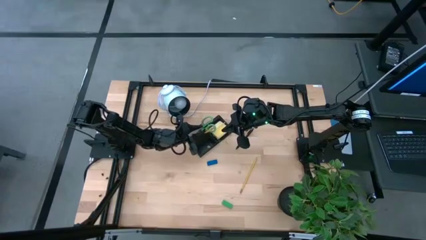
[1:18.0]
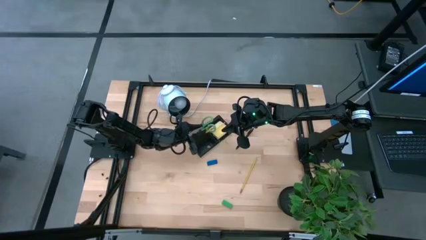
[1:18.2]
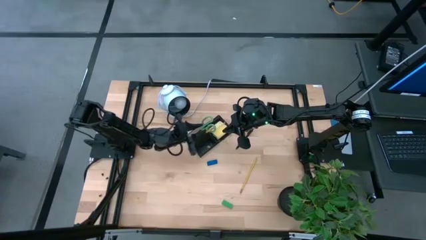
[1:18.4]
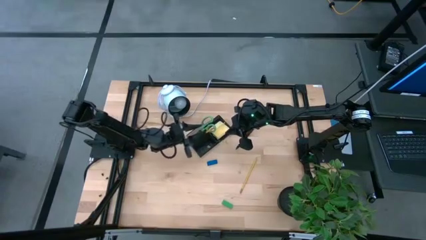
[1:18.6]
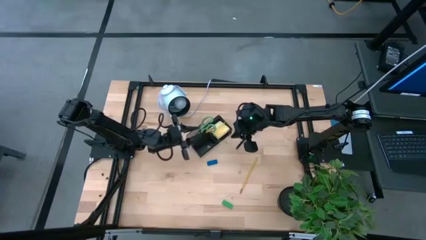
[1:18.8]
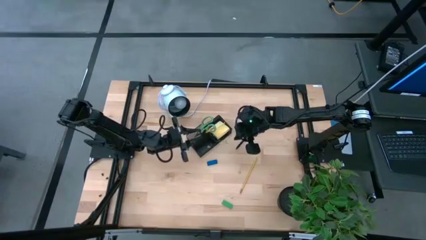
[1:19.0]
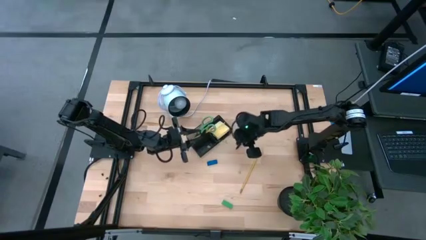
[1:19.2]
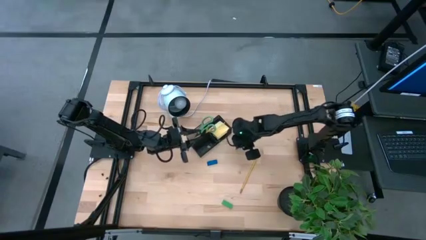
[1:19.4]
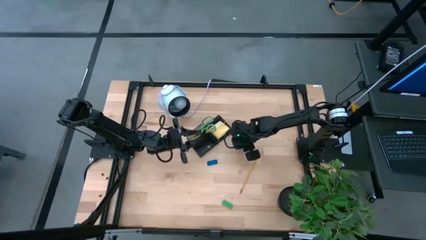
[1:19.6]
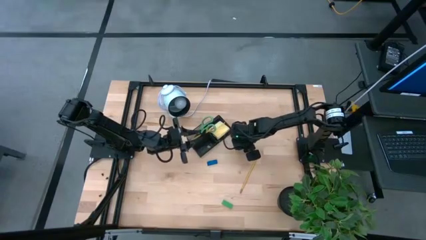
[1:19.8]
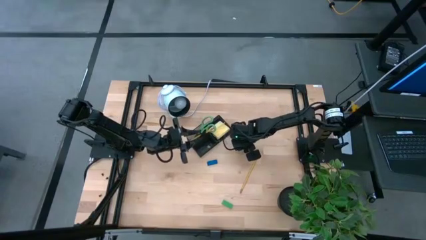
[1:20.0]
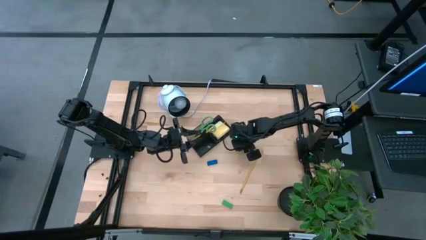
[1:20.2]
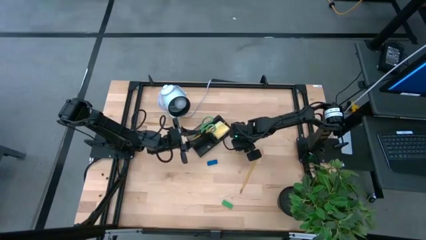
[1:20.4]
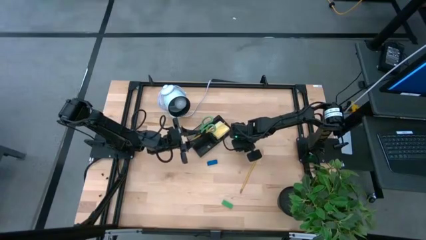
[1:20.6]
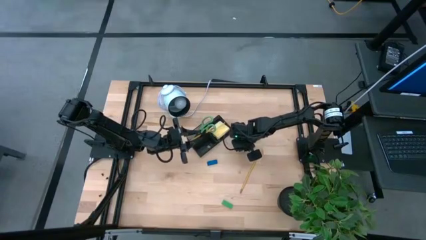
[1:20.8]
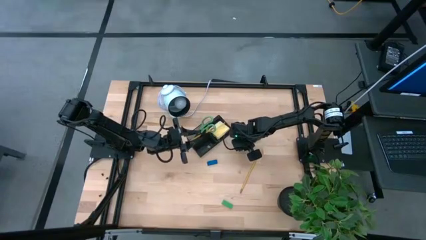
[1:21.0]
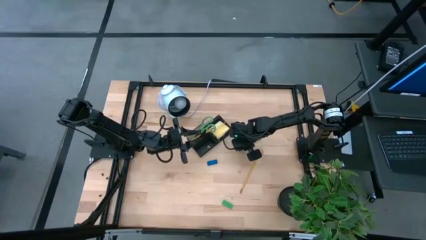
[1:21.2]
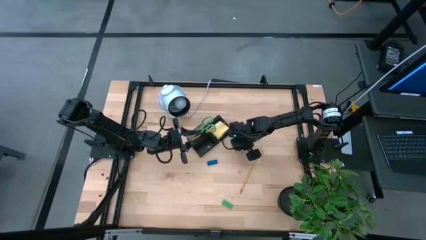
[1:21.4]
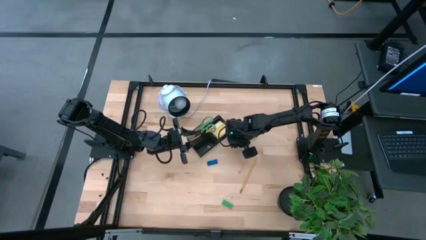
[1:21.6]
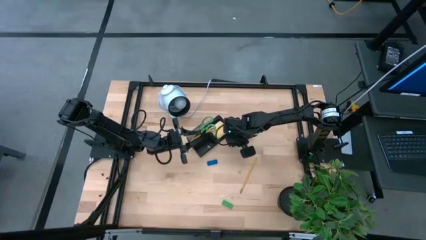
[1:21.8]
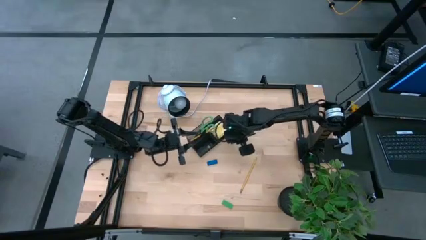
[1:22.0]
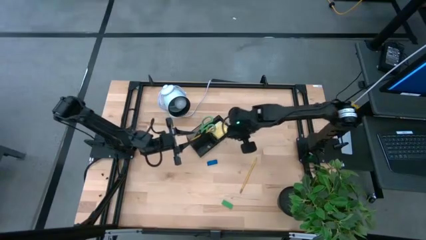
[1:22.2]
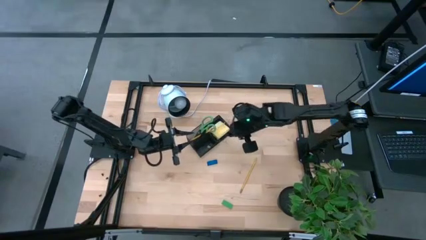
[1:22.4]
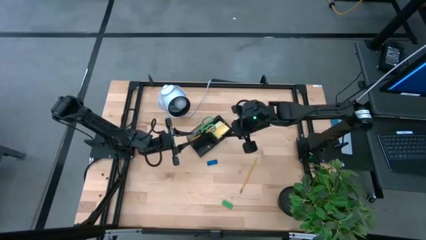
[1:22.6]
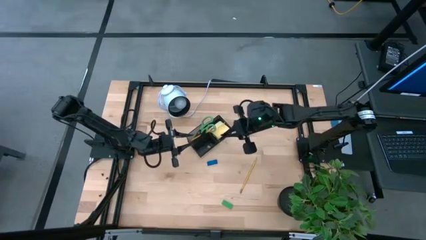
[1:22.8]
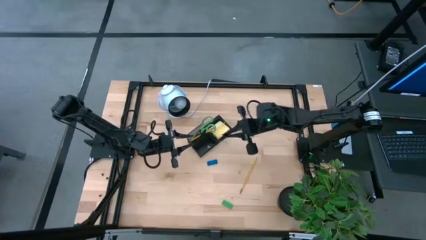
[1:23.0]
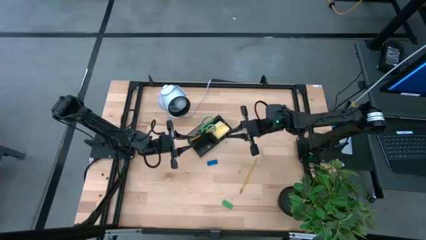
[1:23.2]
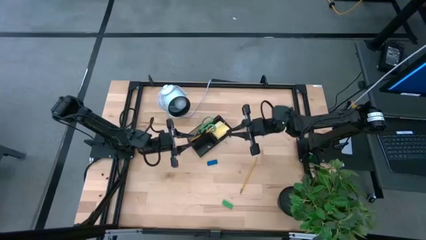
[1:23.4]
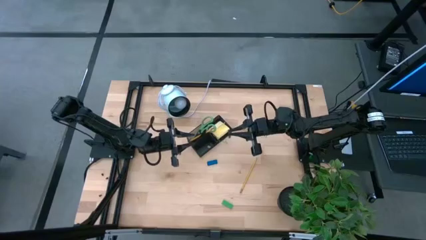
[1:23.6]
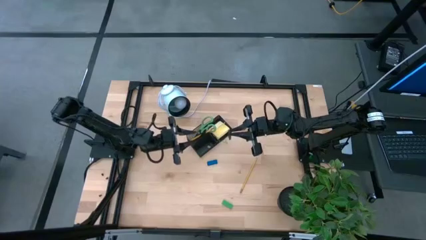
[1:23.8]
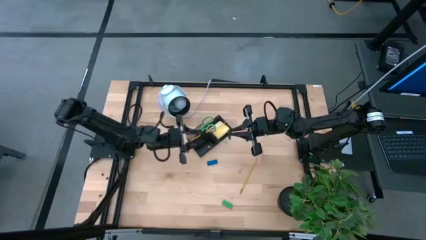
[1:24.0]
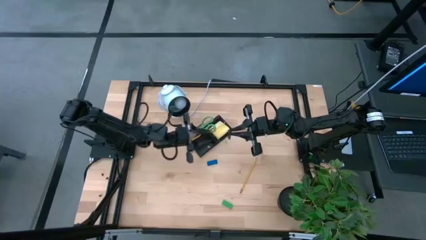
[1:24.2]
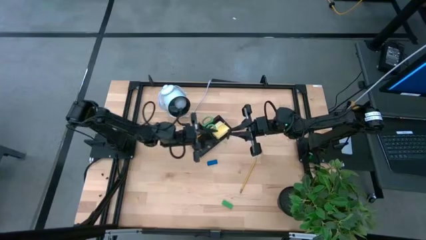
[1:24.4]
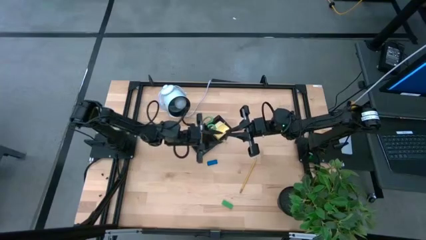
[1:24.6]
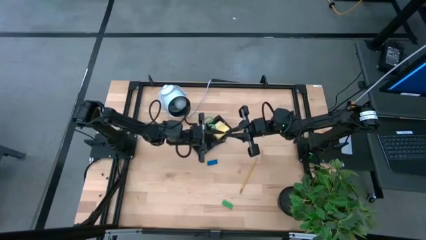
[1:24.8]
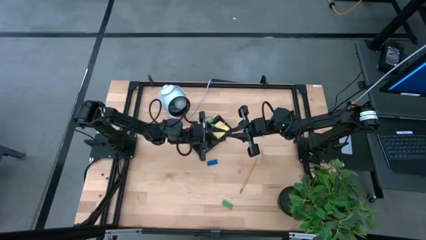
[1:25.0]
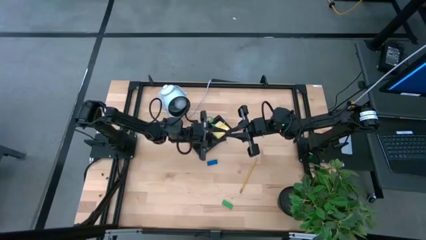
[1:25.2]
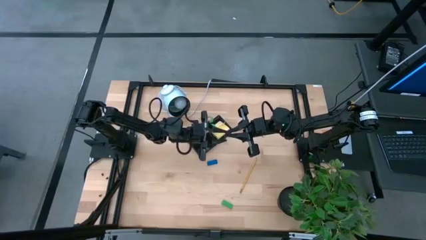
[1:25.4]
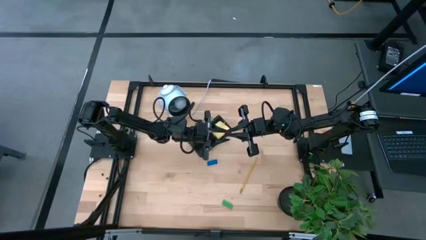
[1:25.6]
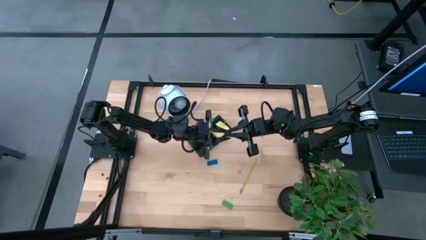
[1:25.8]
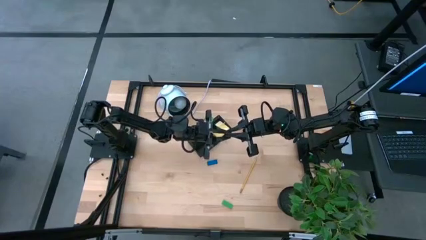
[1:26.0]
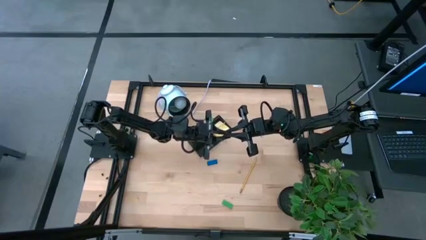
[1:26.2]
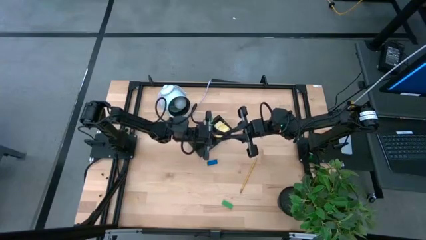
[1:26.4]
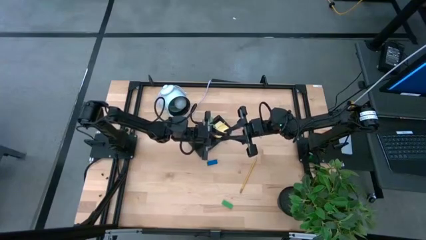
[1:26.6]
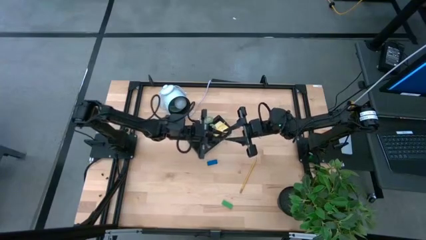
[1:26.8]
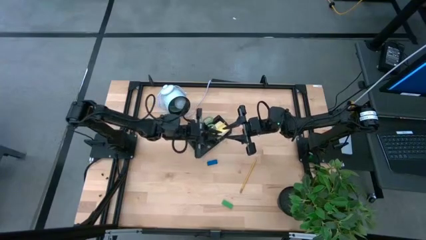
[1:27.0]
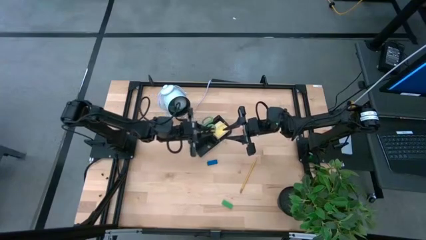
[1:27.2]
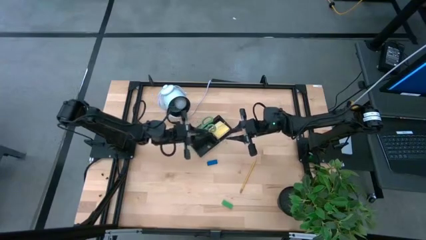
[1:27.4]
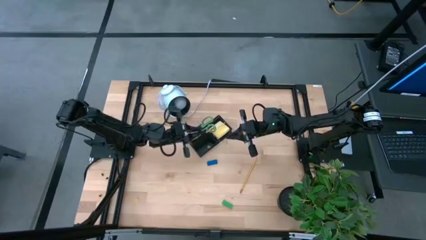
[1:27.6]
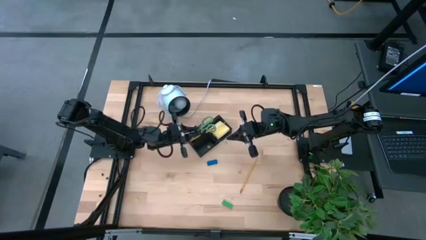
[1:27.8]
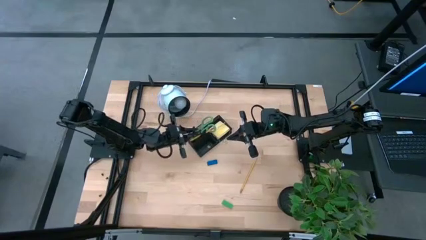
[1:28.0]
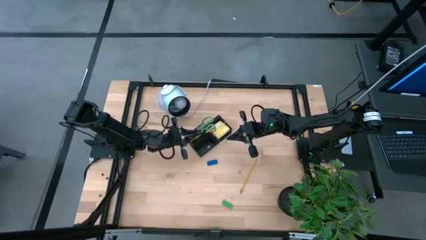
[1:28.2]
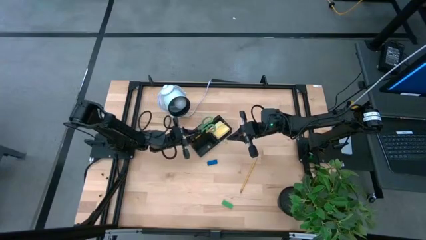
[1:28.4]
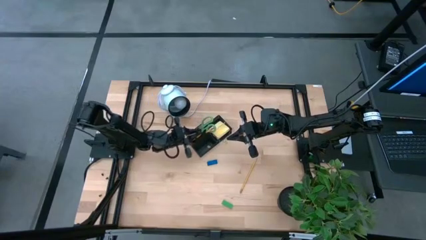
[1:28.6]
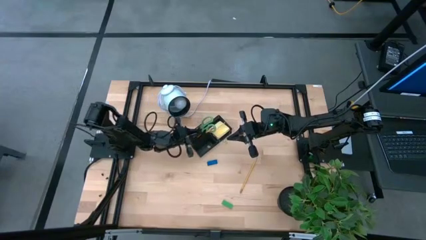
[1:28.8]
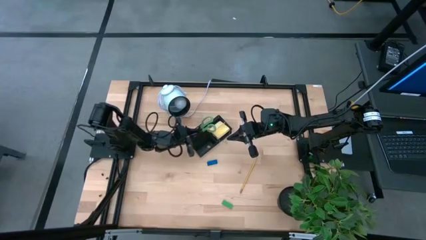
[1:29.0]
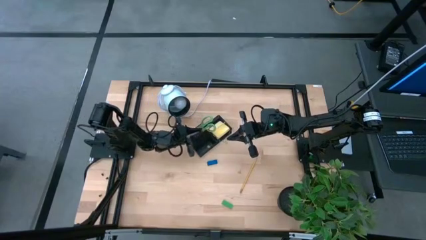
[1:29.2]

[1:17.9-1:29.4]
Task: Pick and place office supplies into organizer
Put the black pen into the black desk organizer
